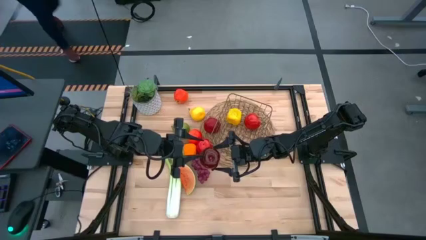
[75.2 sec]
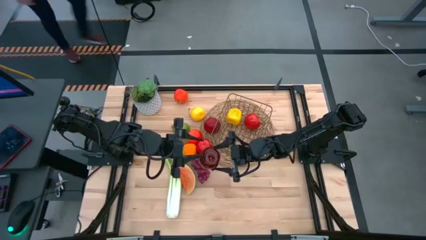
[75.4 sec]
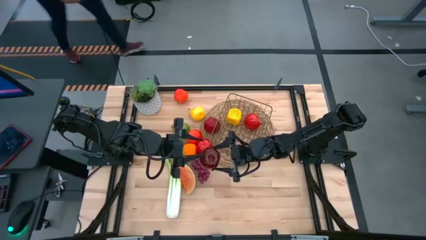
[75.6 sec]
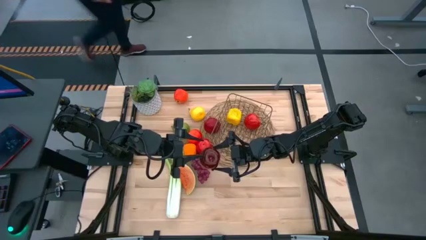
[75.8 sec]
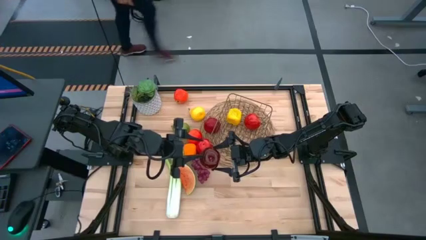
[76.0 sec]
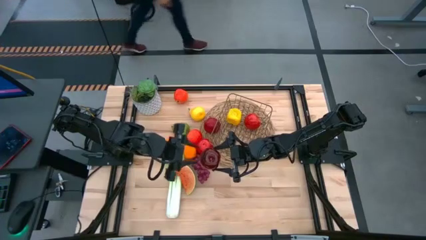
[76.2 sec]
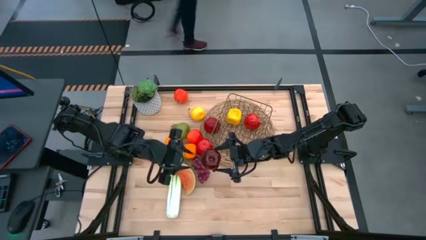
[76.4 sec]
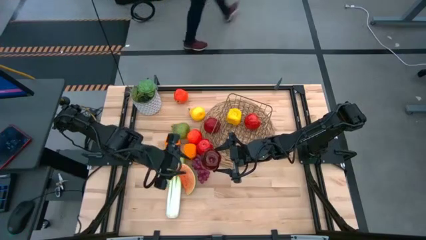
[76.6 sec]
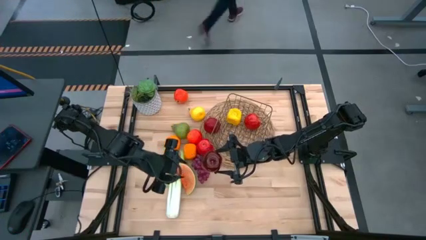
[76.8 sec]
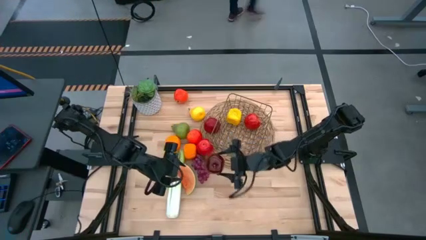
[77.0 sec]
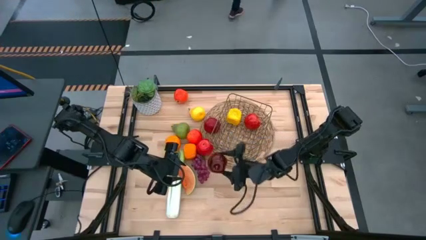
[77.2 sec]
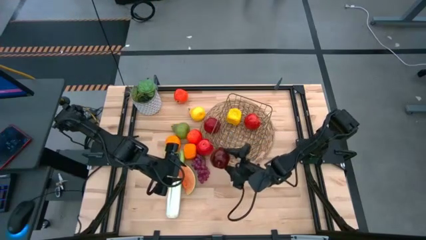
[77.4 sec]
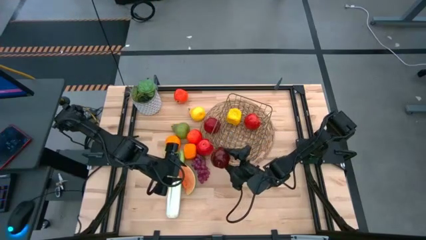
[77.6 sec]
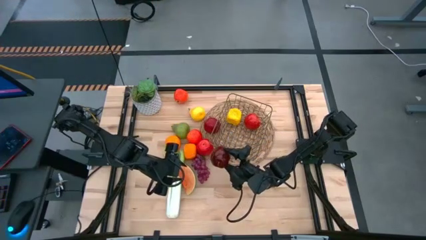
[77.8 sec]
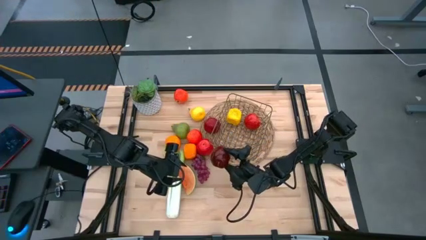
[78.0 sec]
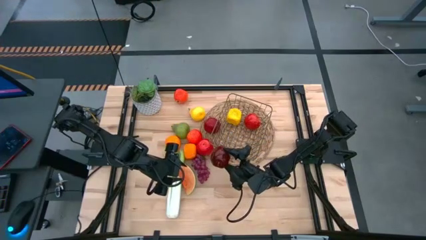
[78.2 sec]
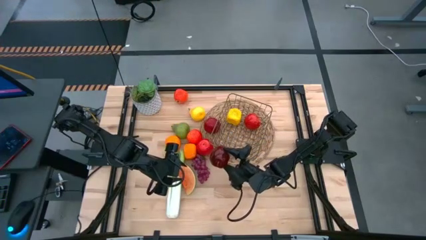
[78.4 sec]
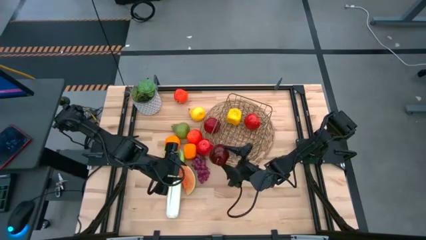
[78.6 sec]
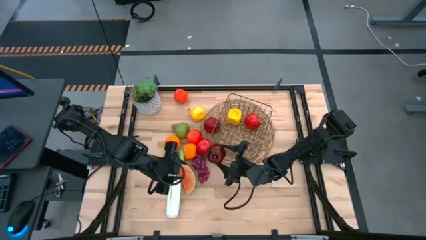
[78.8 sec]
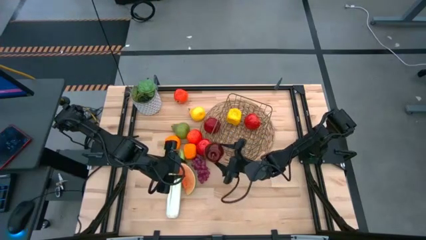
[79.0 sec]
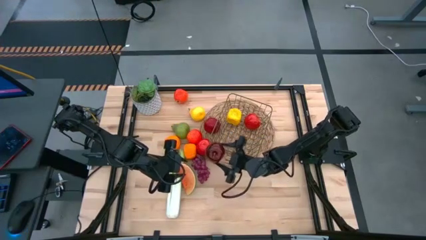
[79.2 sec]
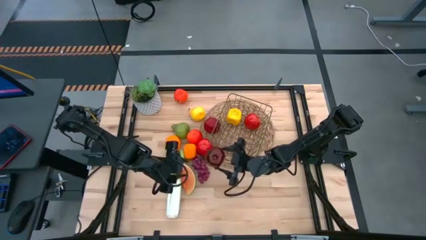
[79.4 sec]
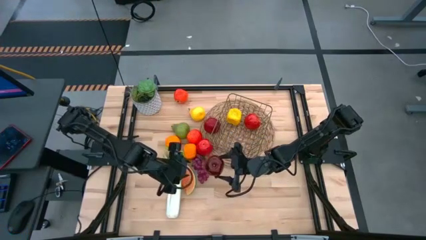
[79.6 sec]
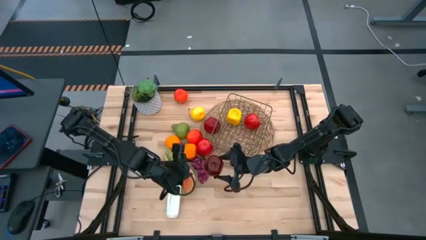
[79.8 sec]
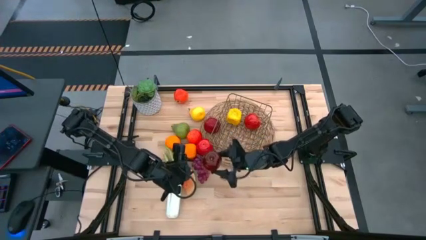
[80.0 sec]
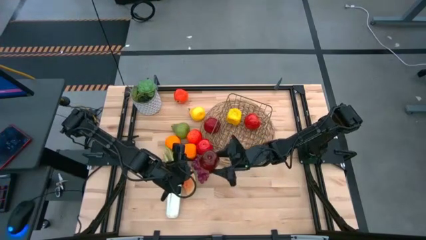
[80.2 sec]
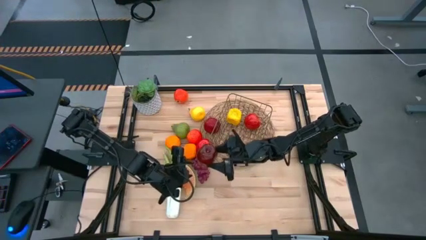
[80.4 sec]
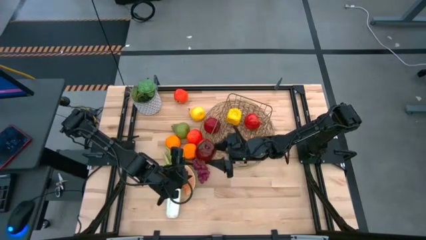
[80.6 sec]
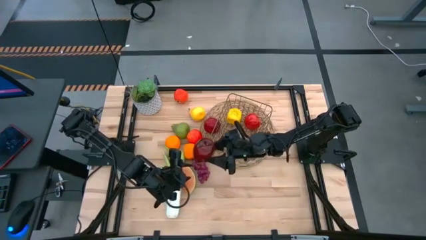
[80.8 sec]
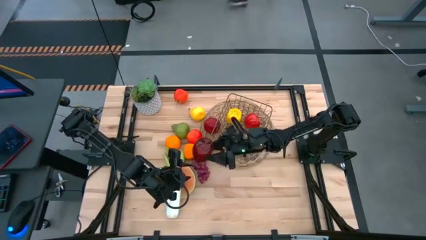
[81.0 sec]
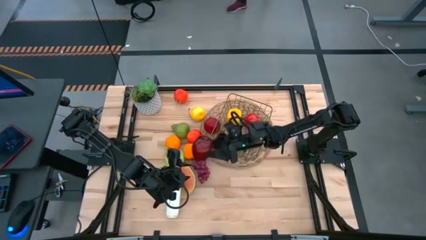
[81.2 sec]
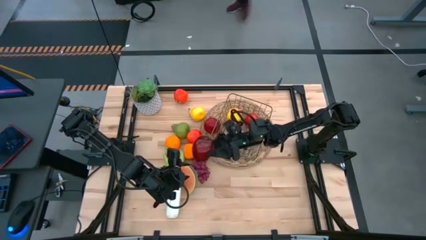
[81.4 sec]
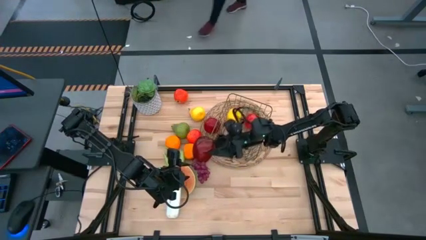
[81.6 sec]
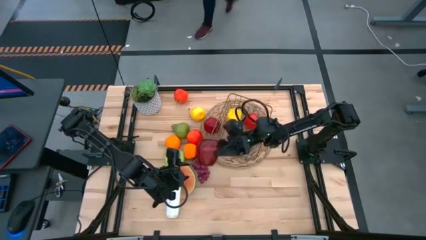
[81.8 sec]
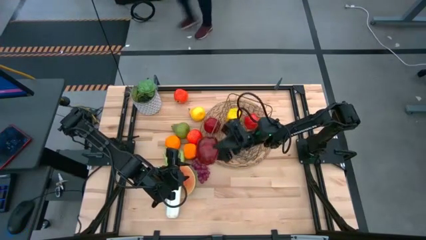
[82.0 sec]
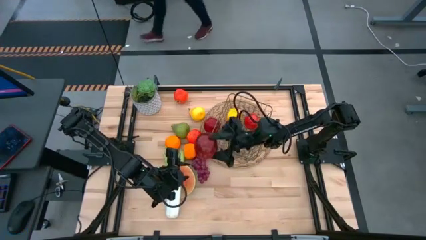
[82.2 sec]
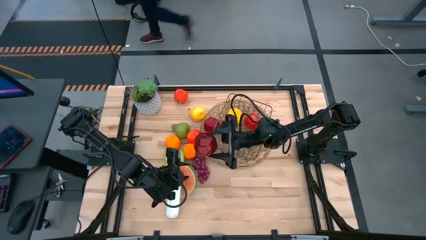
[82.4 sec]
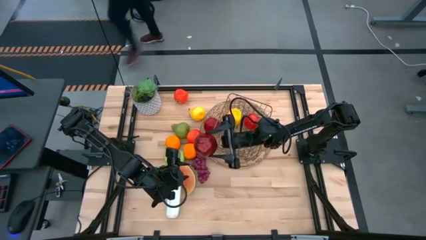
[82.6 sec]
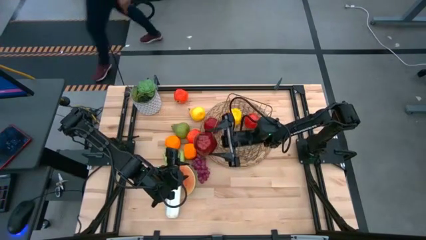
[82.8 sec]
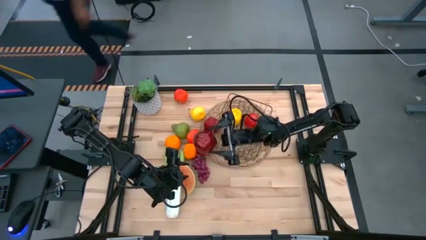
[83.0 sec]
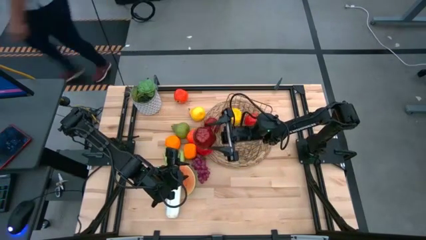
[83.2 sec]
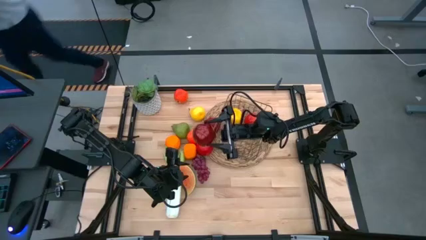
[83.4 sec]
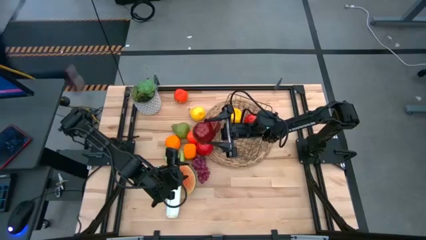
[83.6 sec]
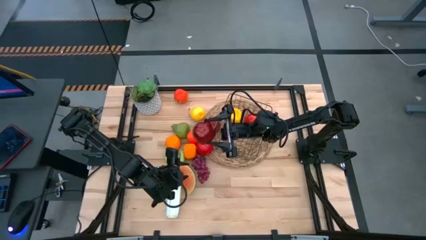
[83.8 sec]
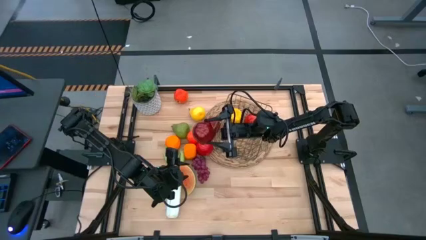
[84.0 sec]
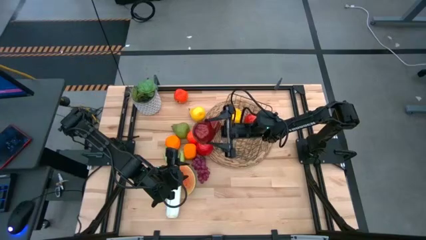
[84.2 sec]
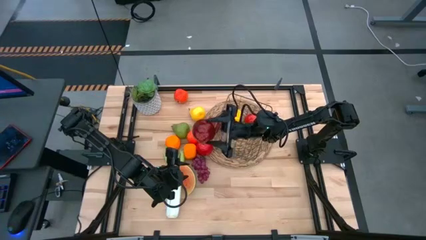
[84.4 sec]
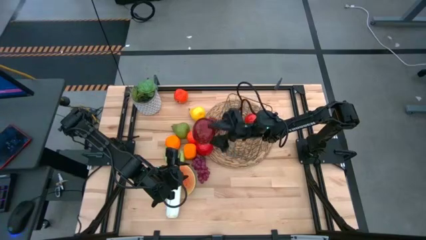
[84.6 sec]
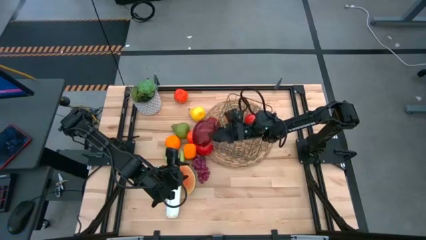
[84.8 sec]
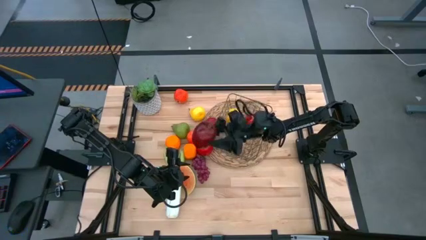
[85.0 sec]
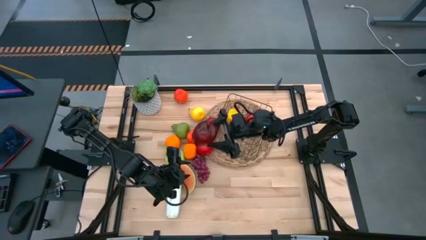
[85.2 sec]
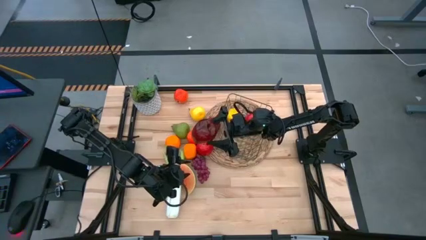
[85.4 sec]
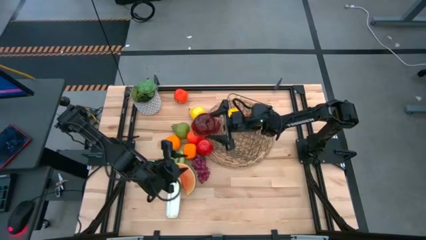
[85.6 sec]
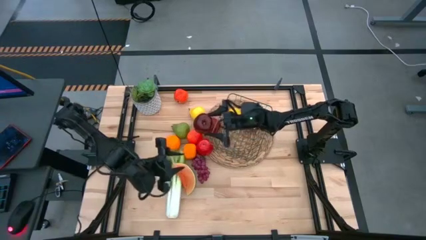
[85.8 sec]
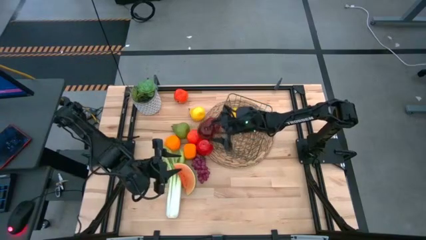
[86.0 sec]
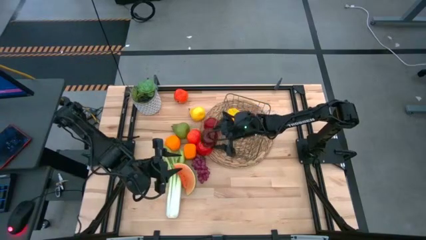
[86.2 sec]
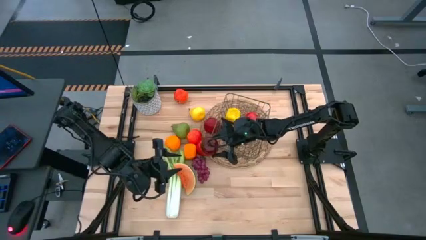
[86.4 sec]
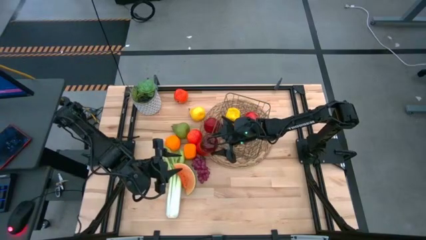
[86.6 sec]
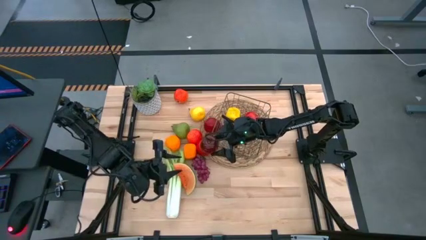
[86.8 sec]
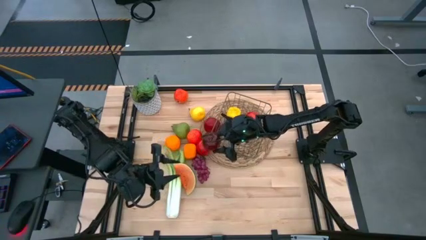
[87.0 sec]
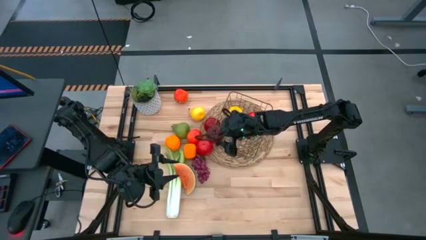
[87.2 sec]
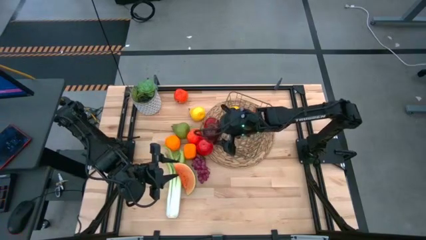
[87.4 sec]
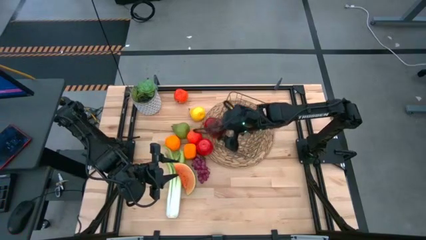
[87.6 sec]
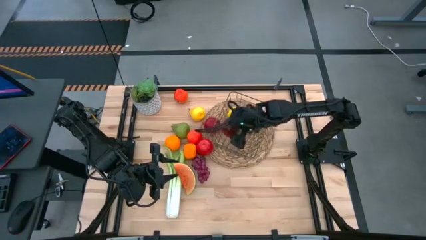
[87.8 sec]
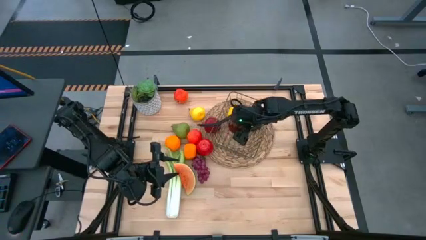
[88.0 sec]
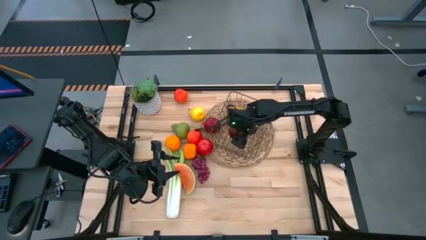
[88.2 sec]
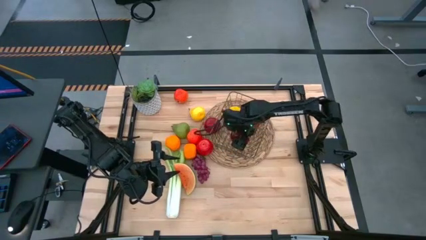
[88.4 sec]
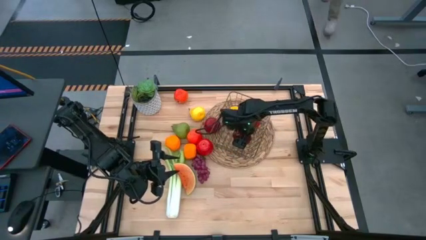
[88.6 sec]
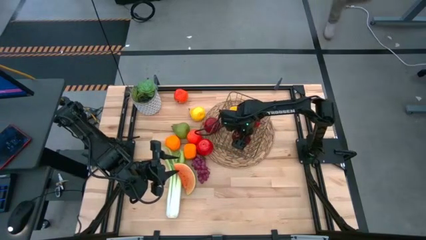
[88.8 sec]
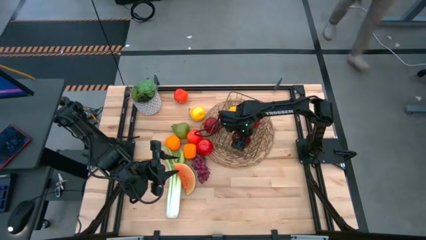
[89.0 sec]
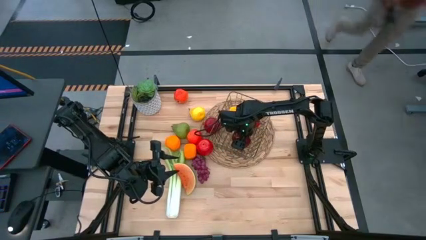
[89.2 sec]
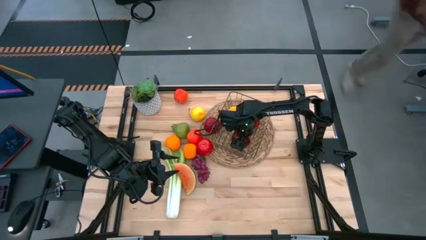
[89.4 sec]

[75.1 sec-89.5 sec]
Task: Build produce basket
Put the red apple into the gold wire basket

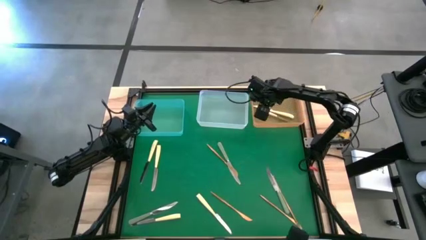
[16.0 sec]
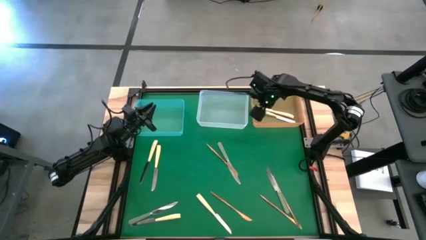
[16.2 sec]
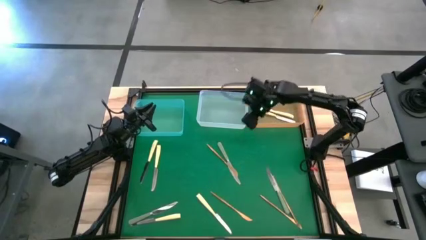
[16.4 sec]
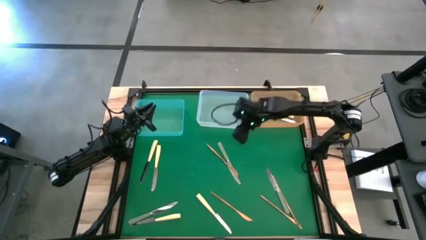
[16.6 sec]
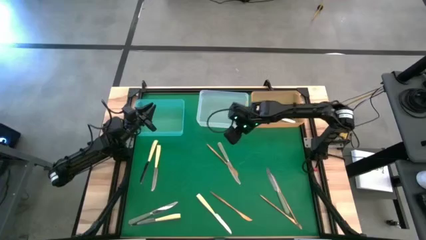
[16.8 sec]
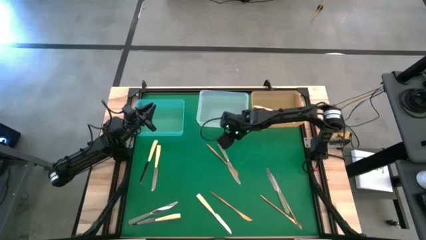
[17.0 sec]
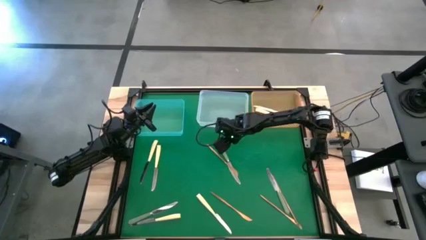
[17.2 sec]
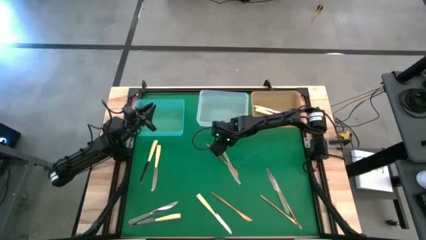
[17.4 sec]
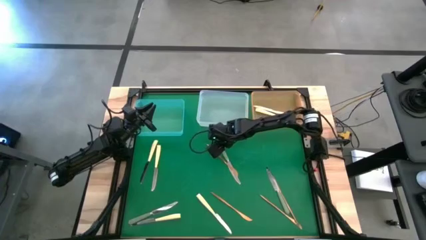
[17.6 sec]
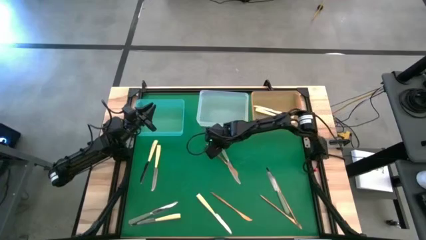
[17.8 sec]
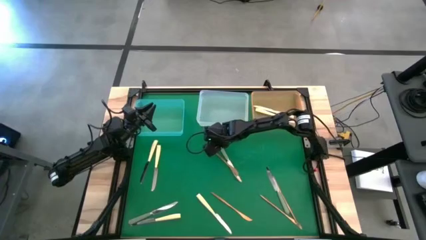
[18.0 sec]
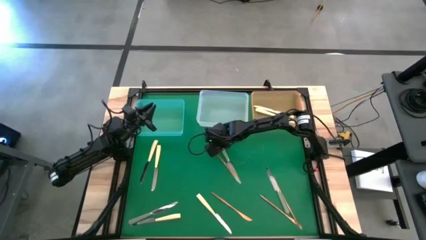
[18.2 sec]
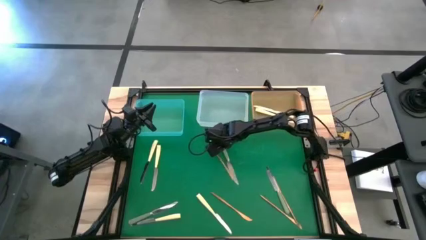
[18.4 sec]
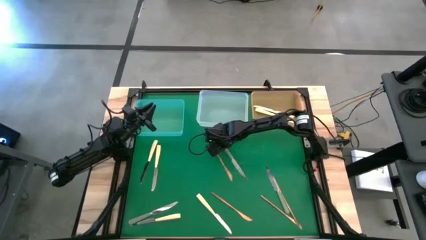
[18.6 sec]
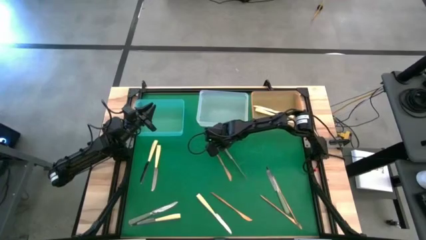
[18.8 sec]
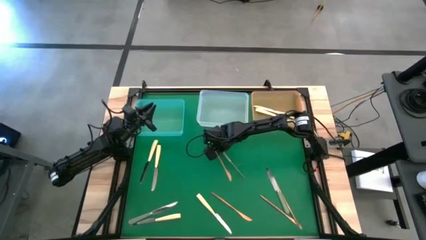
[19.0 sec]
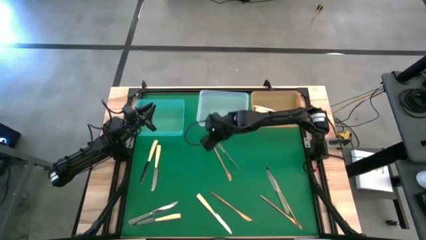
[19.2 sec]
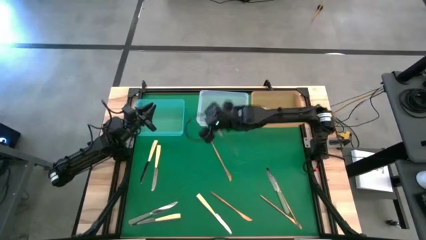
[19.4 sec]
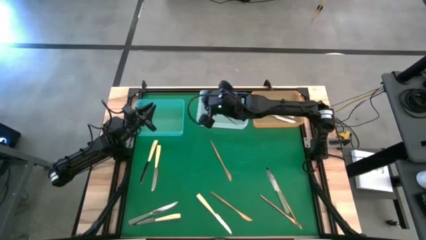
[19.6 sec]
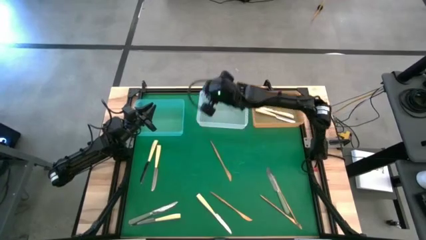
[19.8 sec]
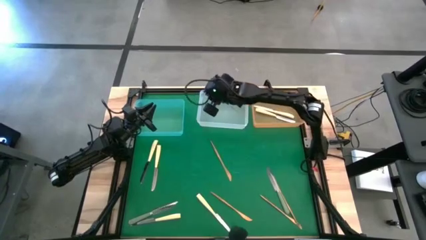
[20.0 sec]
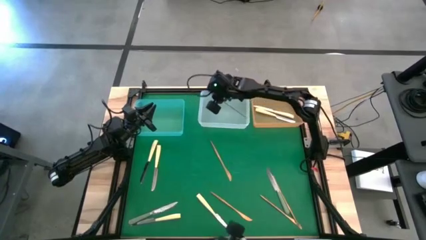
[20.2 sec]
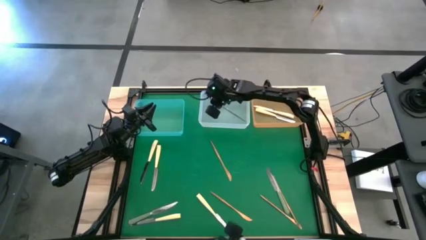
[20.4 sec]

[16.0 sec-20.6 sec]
Task: Sort silverware by color (type)
Put the green knife into the transparent bin
